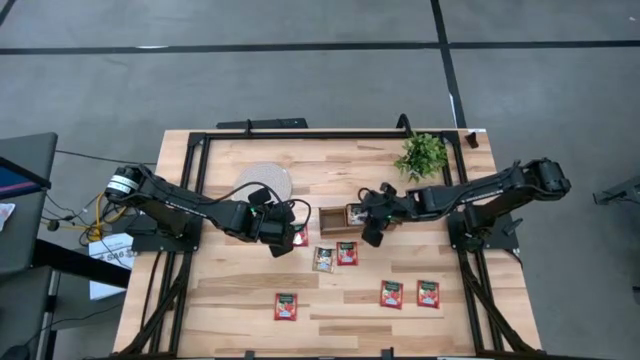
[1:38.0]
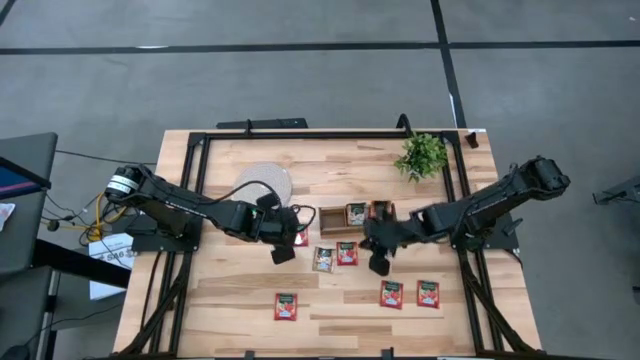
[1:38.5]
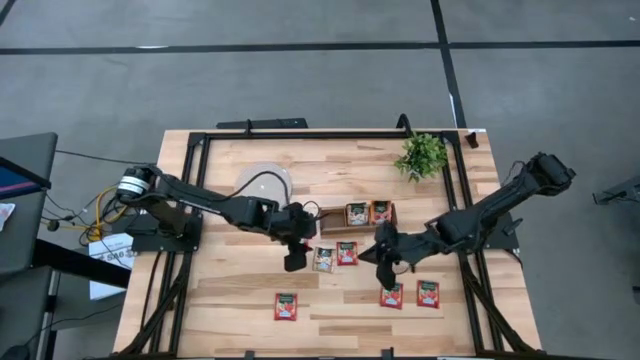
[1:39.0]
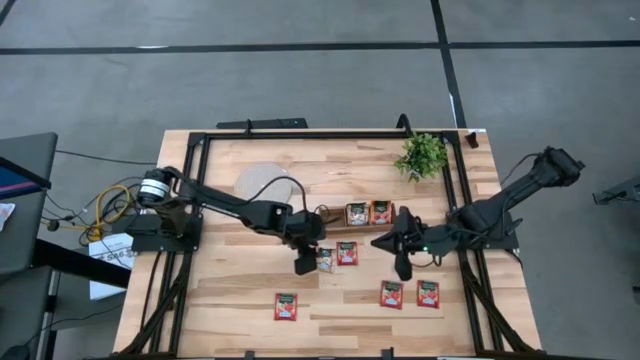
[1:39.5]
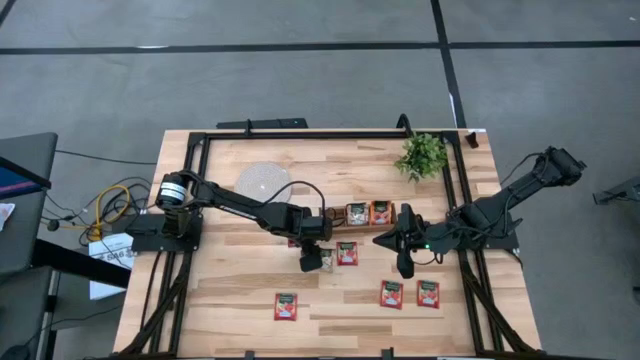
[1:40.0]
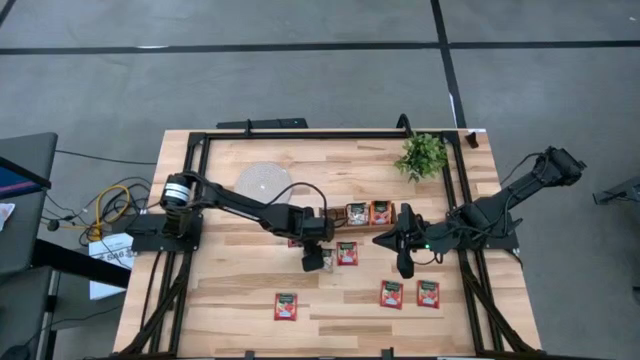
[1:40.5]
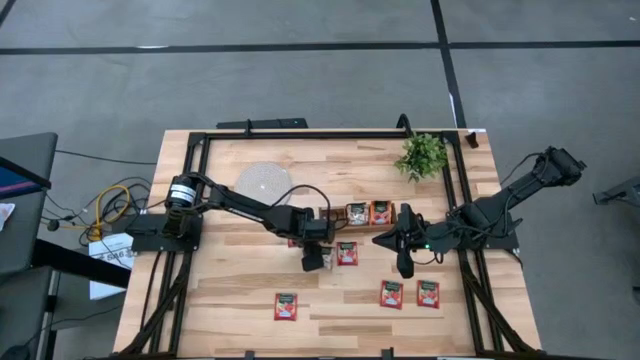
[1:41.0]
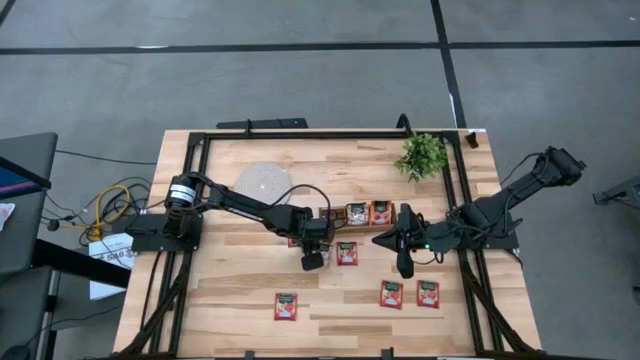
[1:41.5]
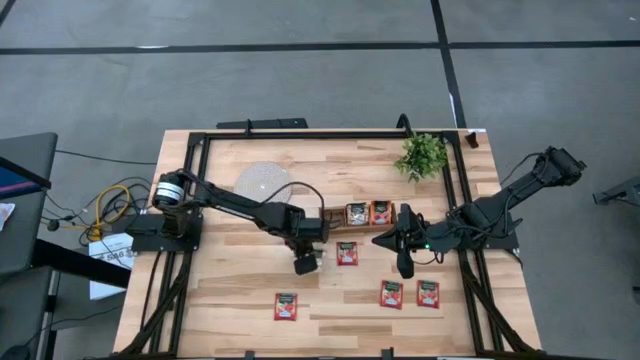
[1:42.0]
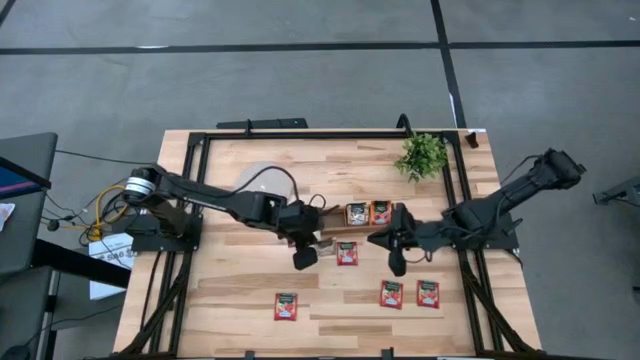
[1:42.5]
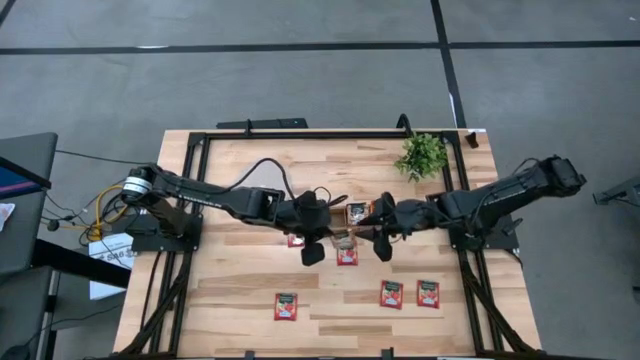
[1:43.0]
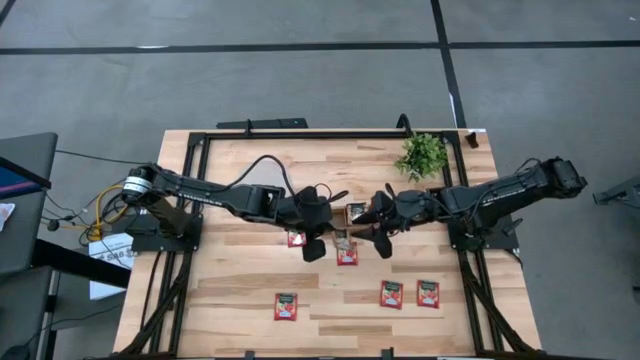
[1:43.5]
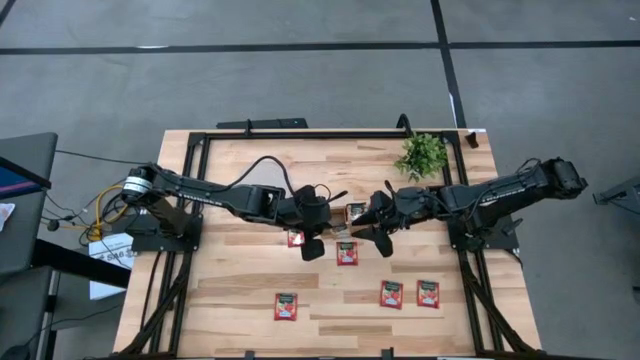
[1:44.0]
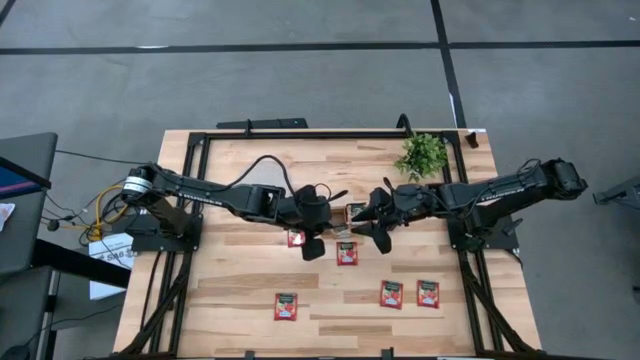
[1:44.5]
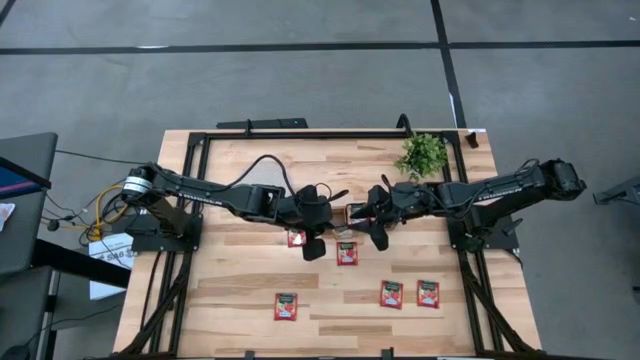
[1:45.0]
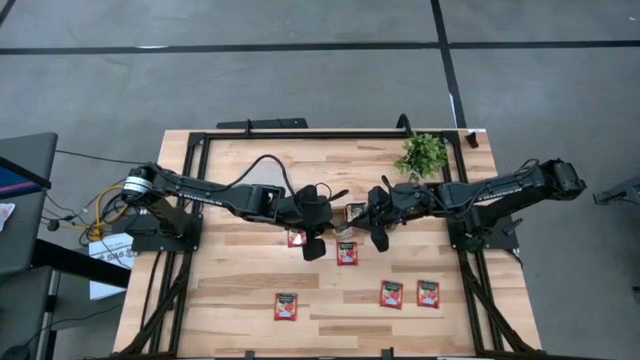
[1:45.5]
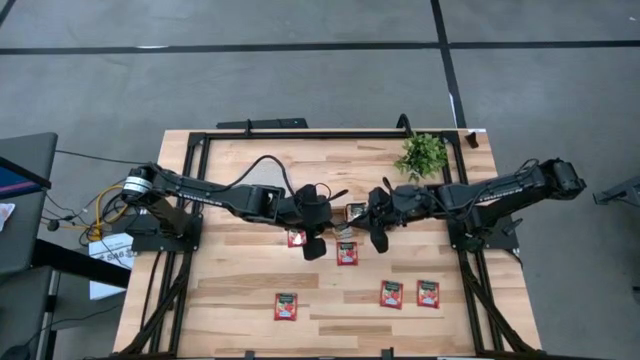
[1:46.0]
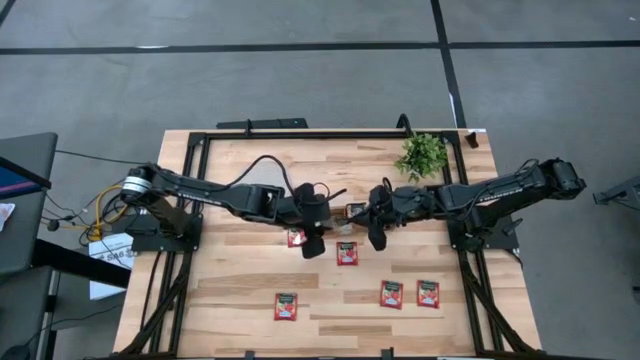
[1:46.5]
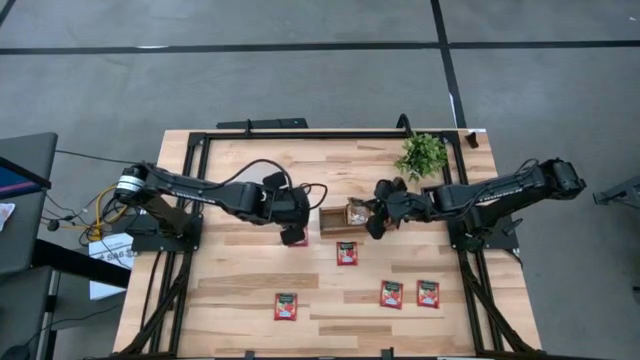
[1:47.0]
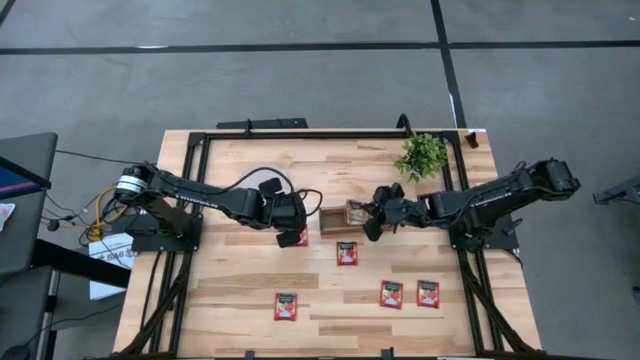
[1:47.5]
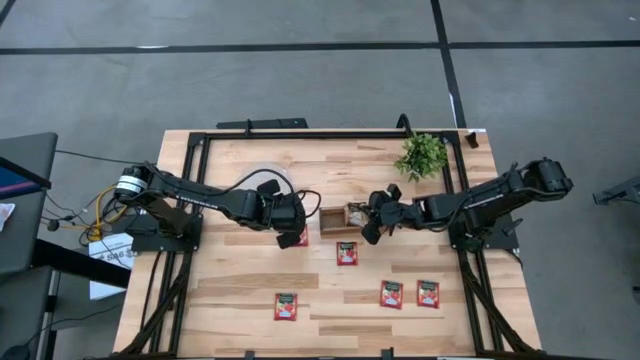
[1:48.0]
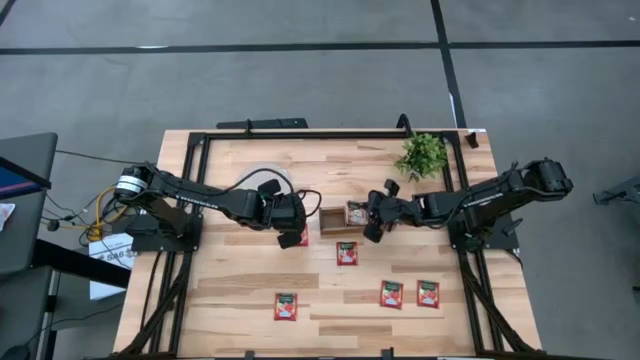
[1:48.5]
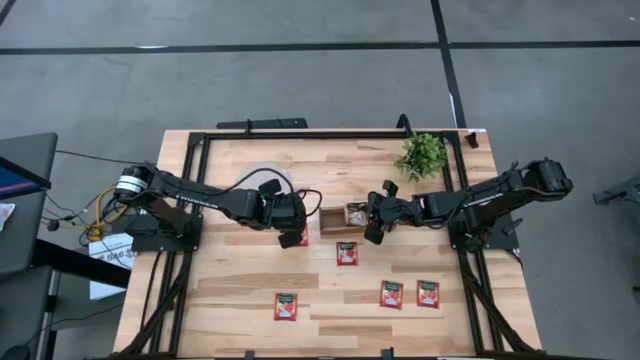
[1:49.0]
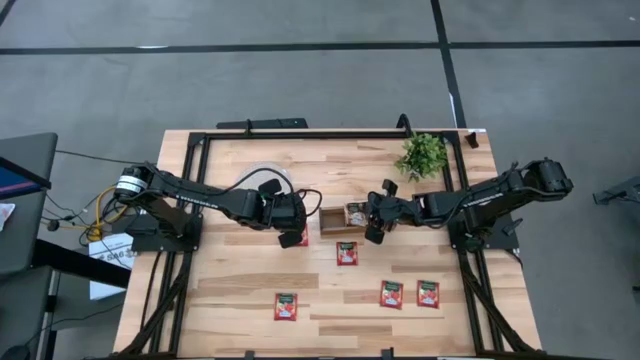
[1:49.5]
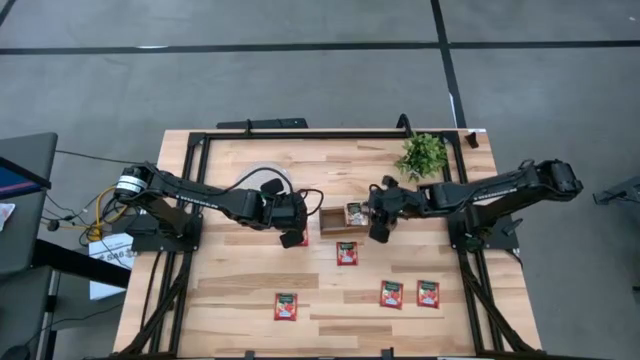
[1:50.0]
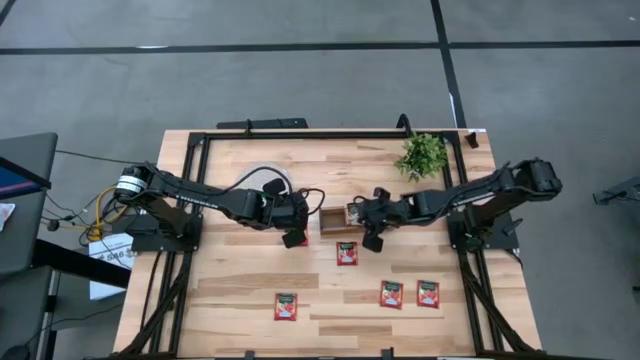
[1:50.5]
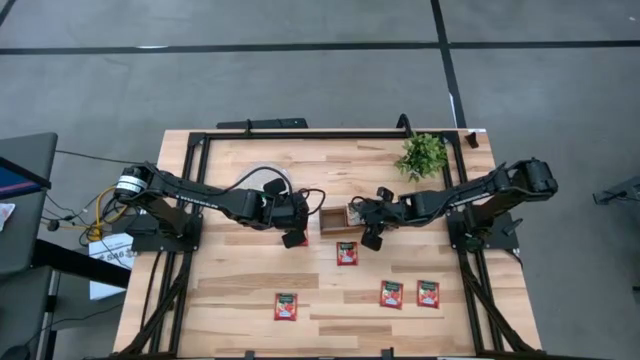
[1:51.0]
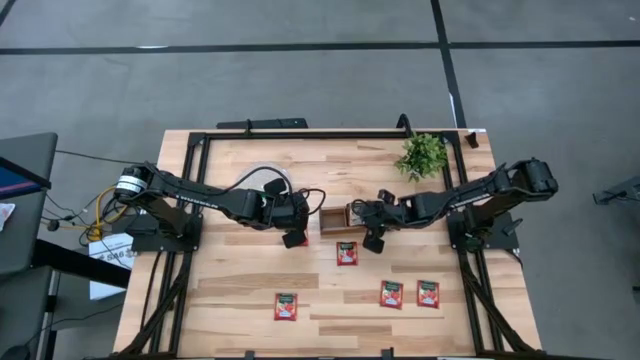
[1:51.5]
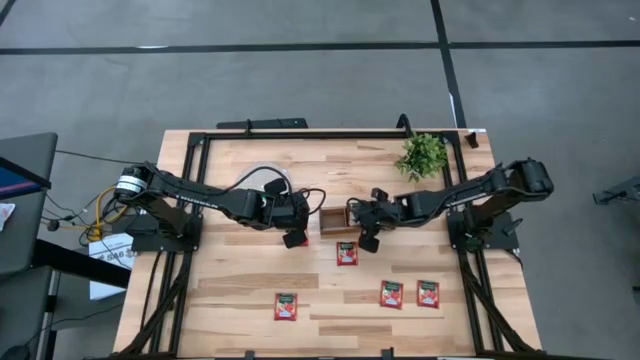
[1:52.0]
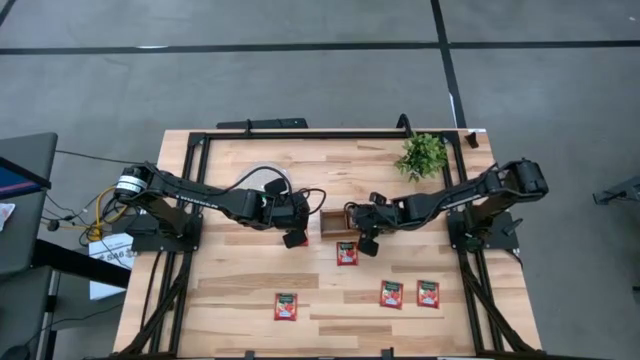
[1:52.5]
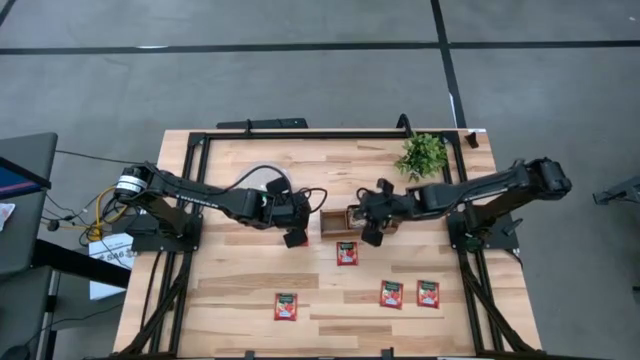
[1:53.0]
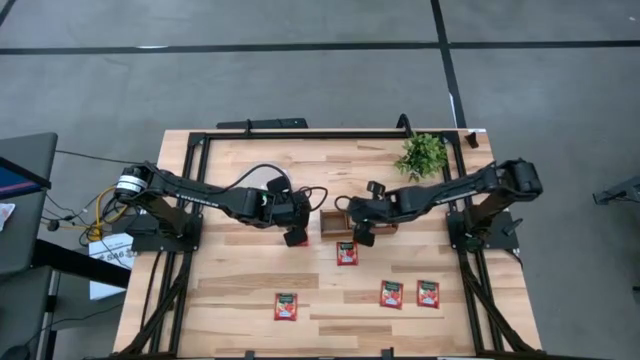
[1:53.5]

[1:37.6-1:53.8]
Task: Pick & Place Tea
Put the brown tea bag into the middle section of the wooden organizer

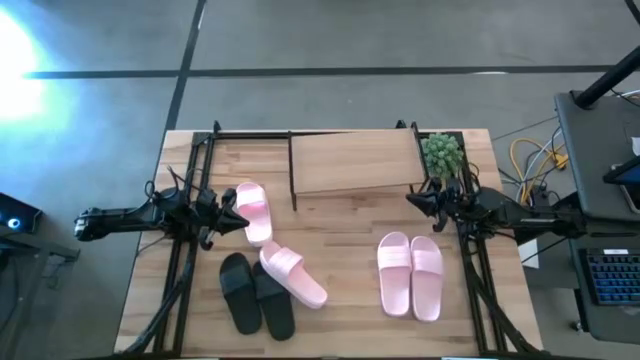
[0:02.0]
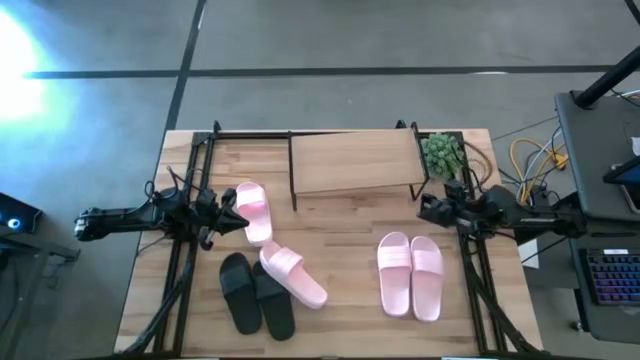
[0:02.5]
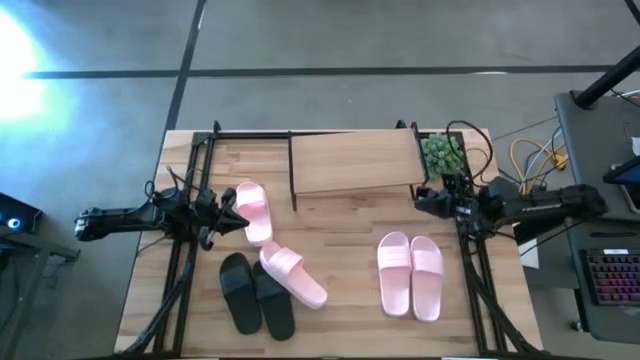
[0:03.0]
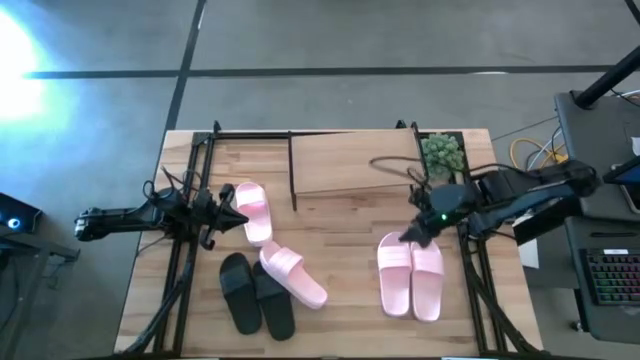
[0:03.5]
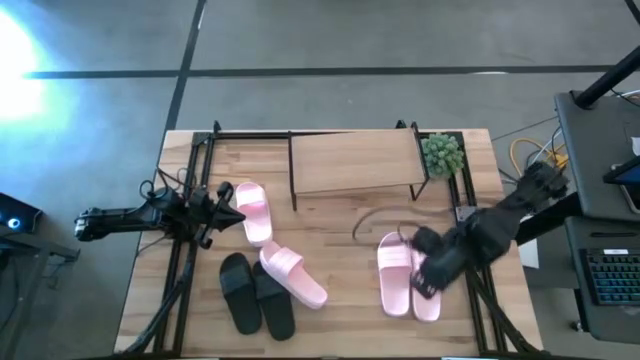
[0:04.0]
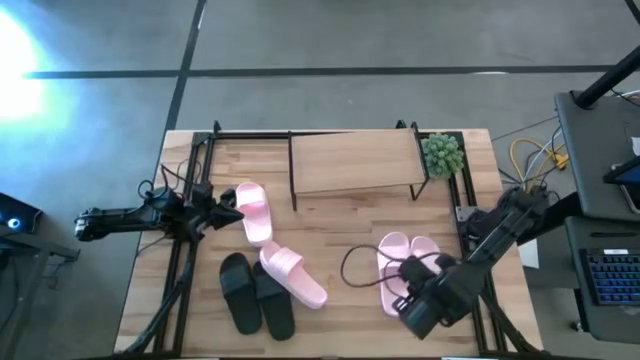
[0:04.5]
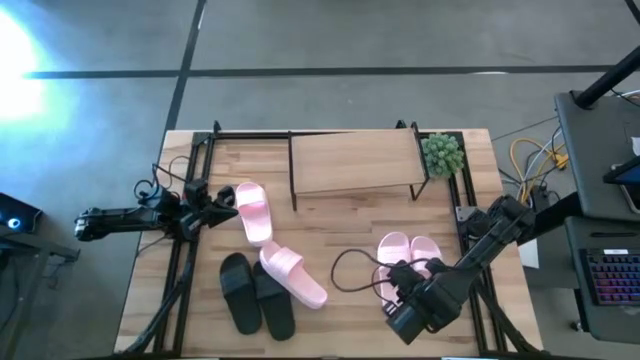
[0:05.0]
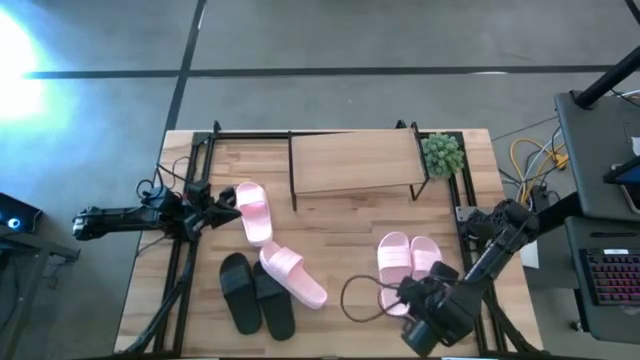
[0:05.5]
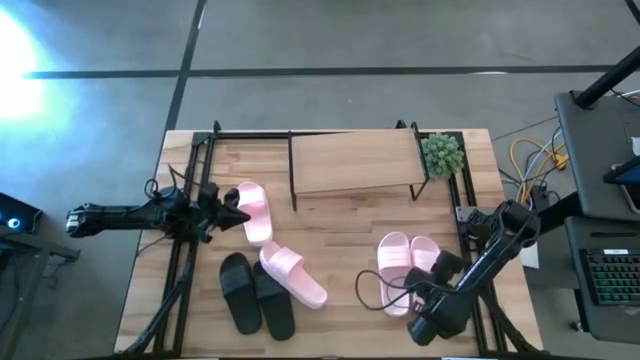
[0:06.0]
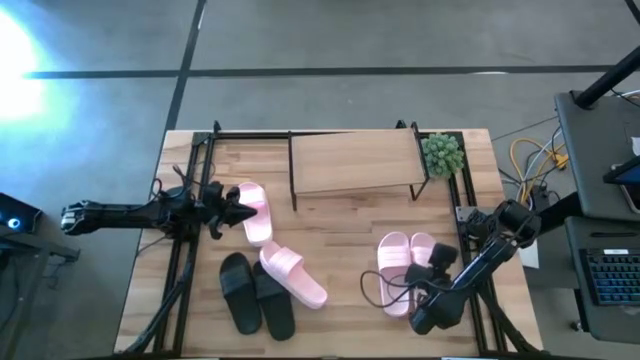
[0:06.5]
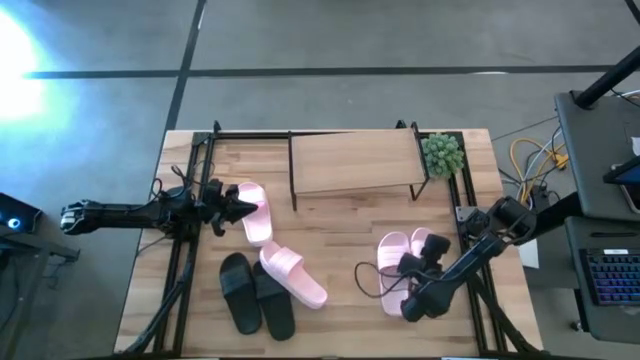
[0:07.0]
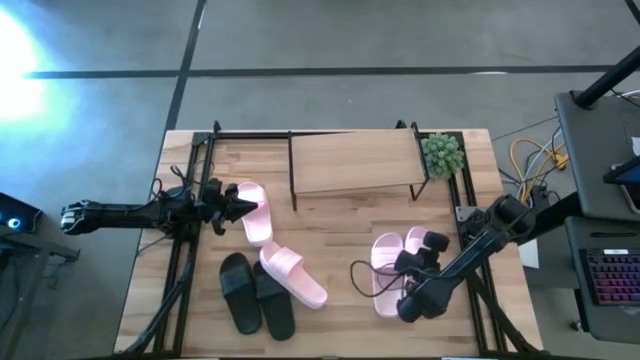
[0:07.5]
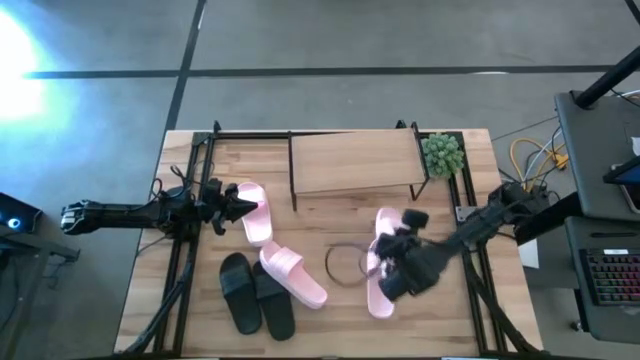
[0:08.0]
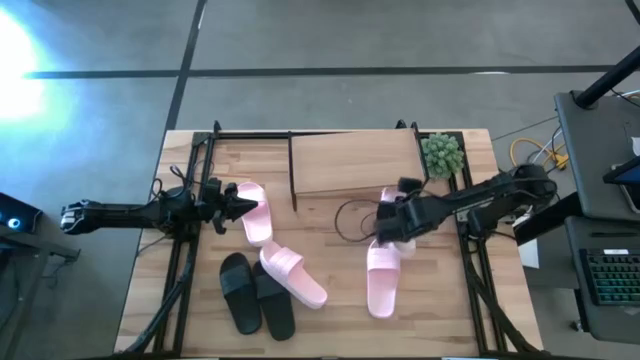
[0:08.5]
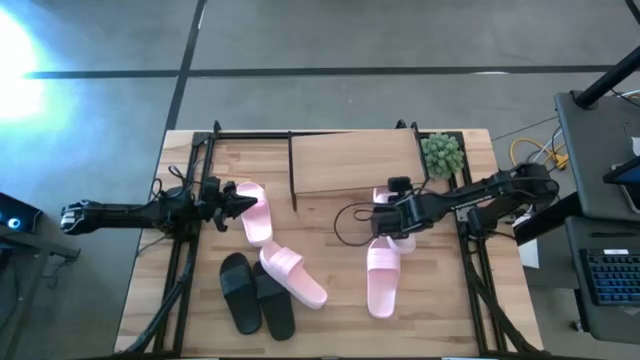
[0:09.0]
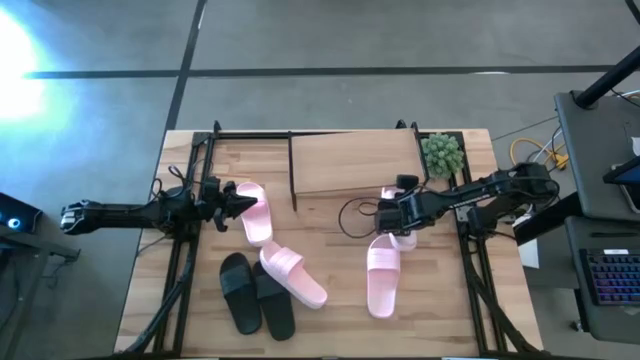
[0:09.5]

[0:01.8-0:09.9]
Task: Pick and place slides into the shelf
Put the pink slipper under the shelf
